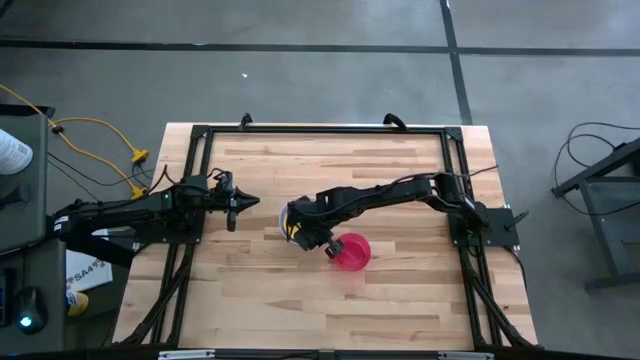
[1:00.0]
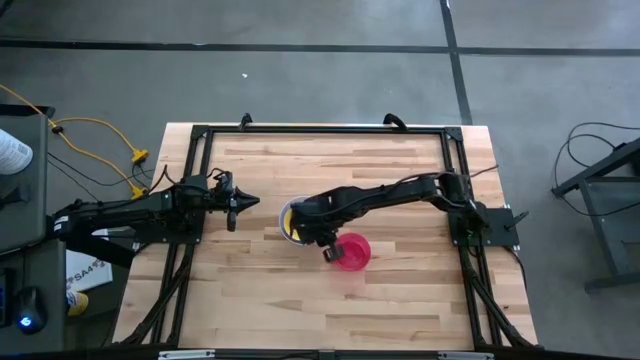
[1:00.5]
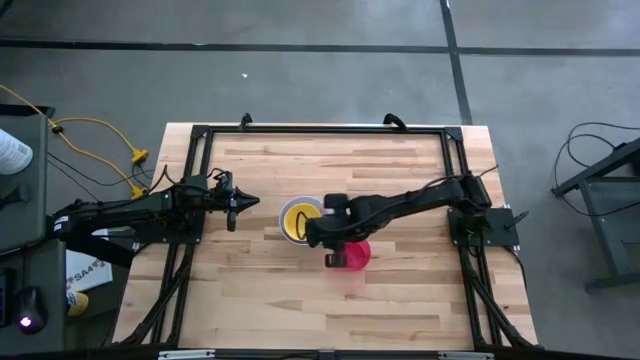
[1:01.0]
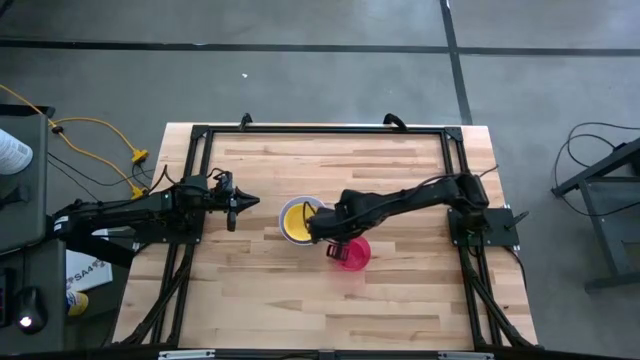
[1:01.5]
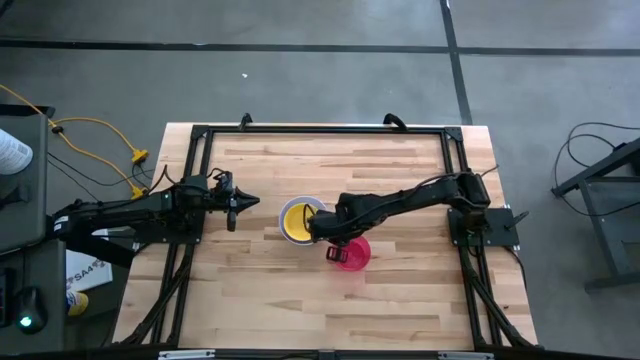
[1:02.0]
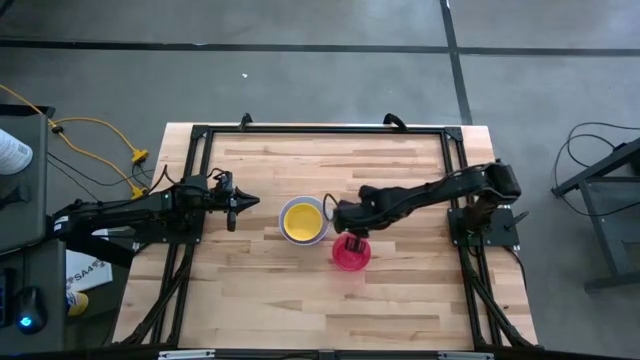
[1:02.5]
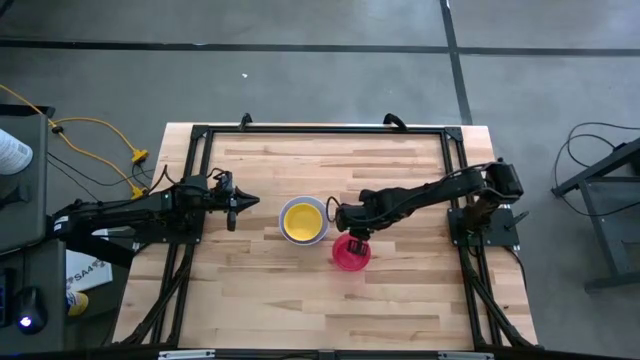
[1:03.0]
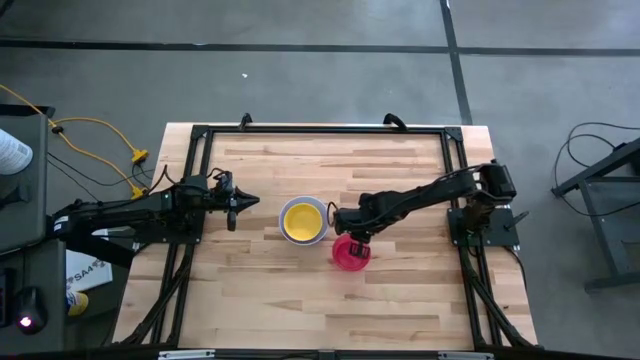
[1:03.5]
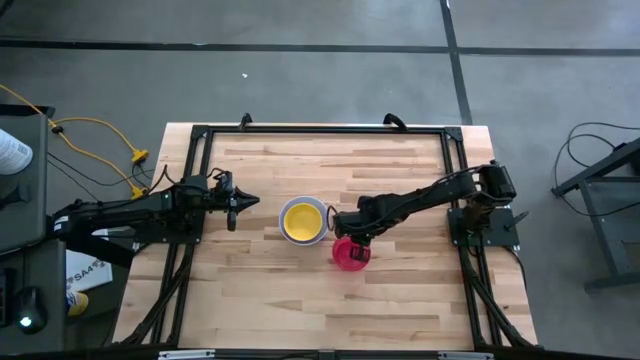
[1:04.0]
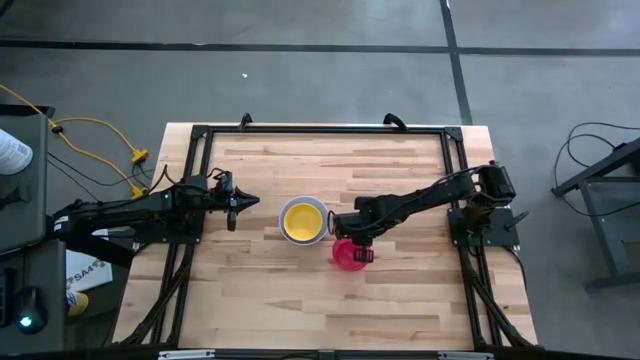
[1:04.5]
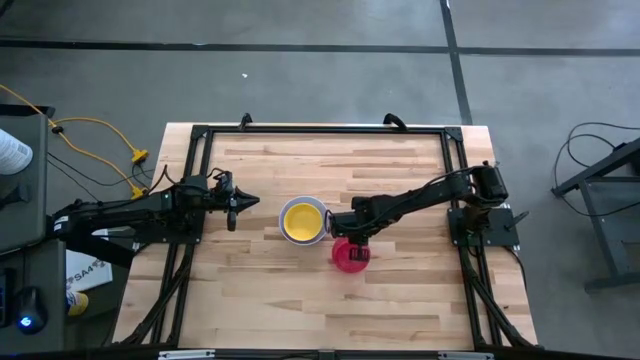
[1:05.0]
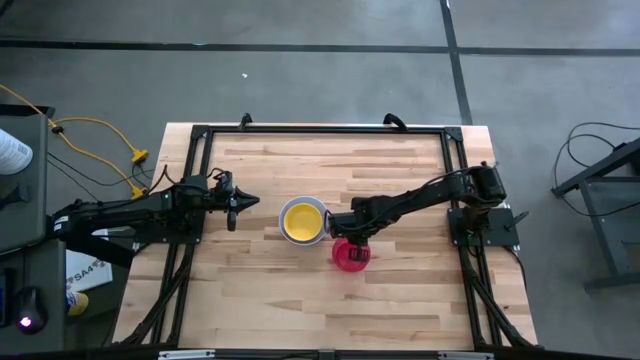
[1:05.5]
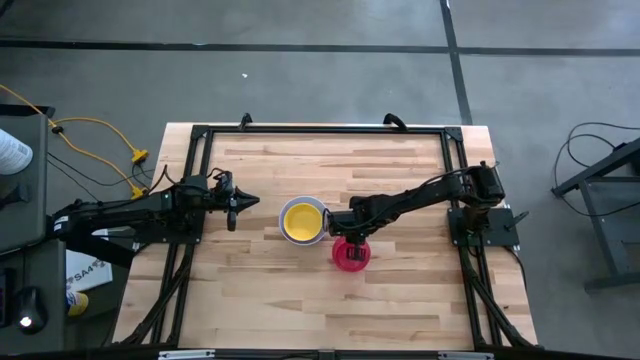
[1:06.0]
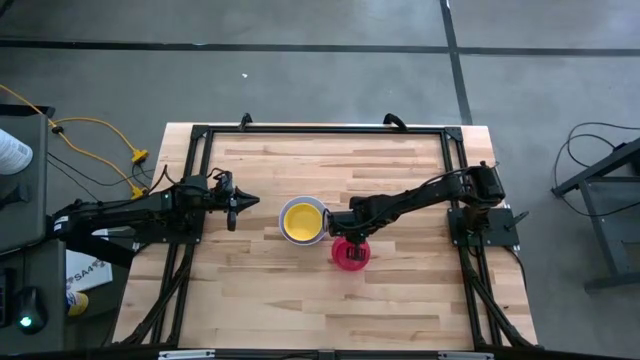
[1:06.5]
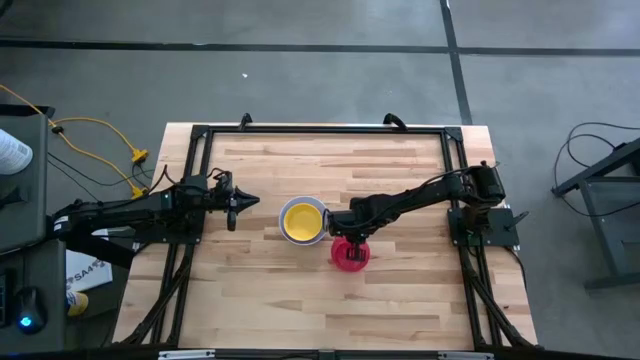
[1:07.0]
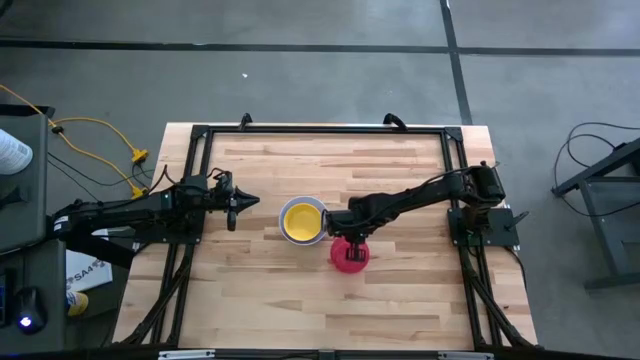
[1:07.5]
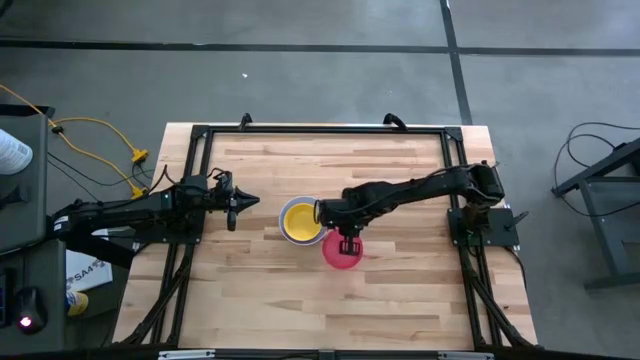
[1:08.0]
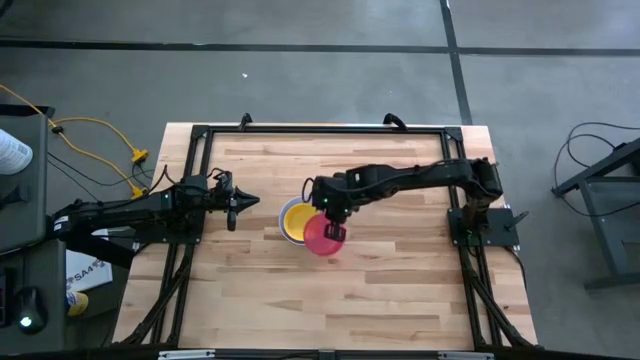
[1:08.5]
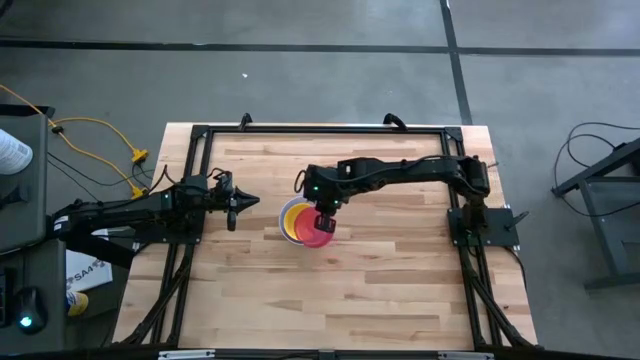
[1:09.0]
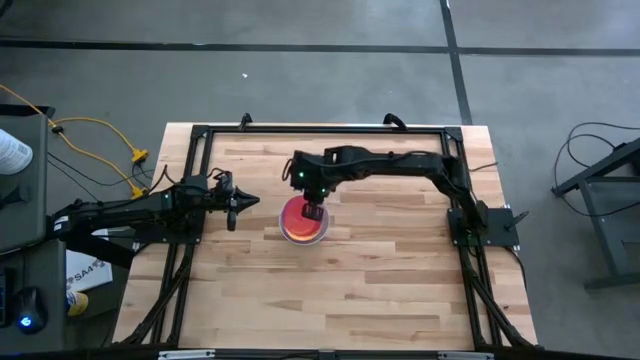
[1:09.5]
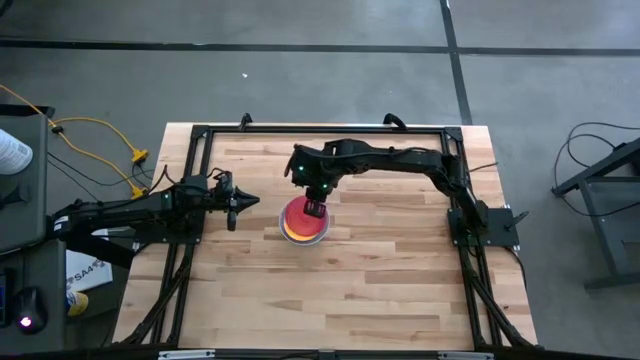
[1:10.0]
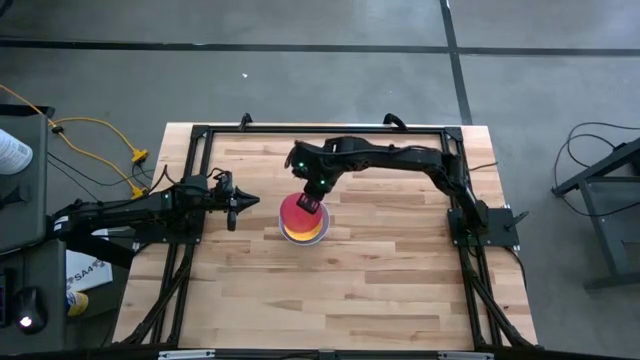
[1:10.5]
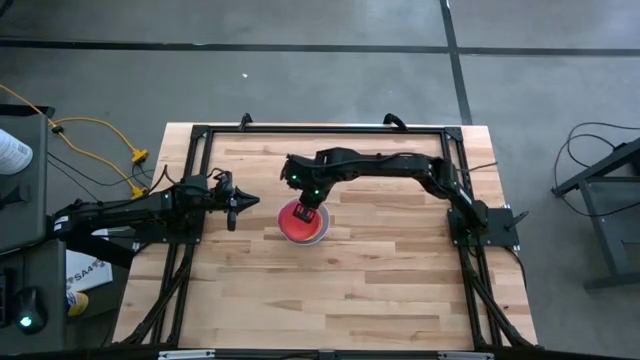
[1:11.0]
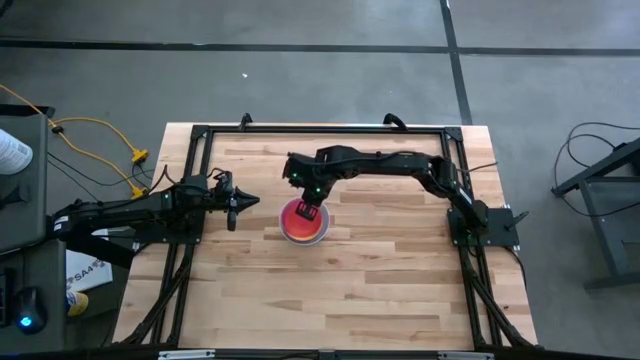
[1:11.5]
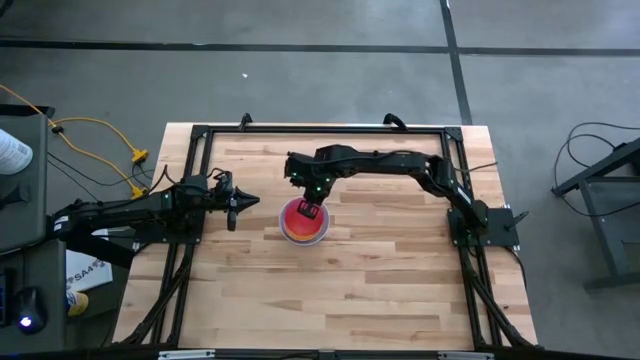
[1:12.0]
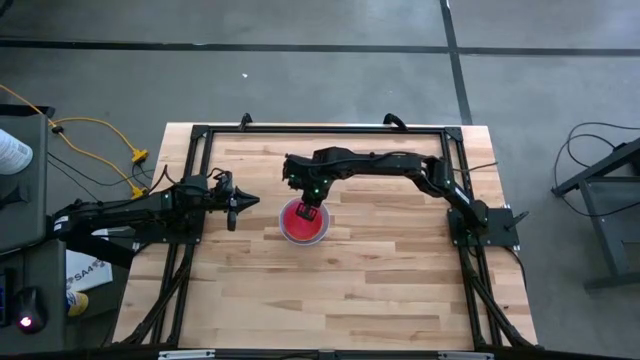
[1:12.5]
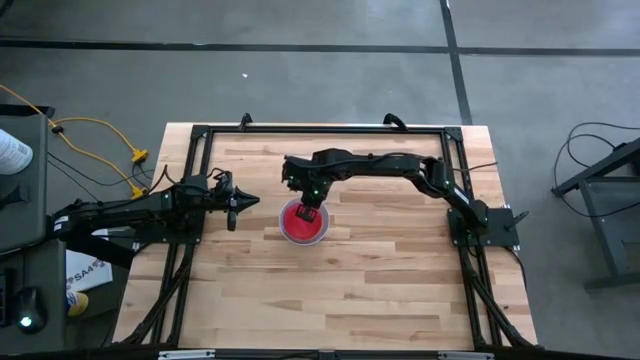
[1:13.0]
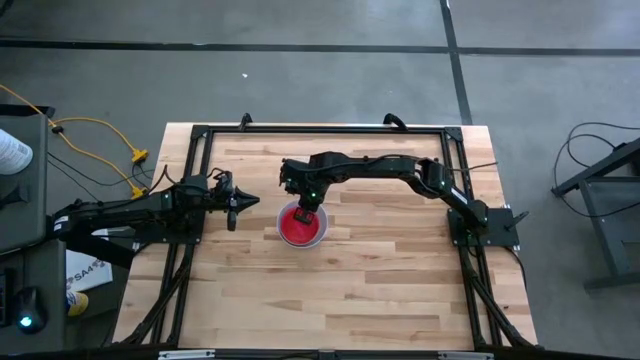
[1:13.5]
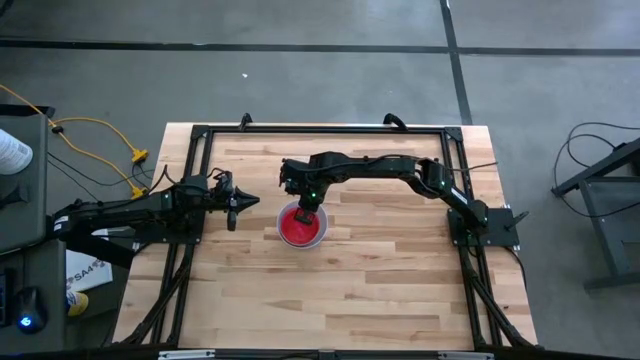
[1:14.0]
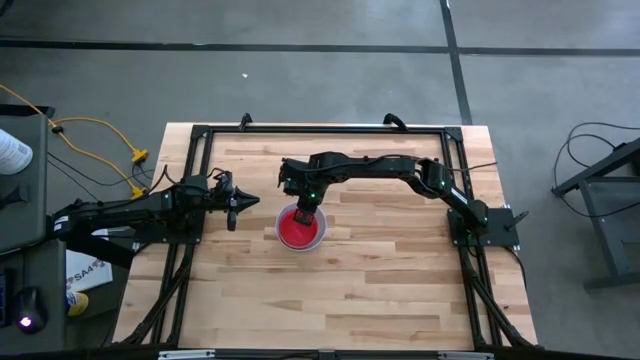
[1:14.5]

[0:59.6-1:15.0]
Stack the red bowl on top of the yellow bowl
